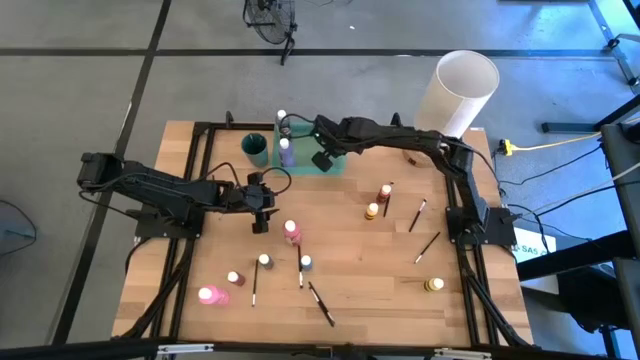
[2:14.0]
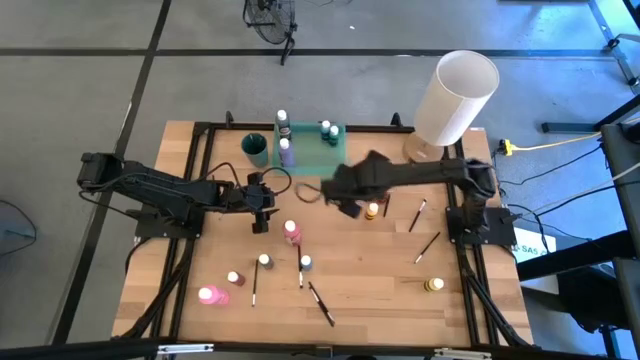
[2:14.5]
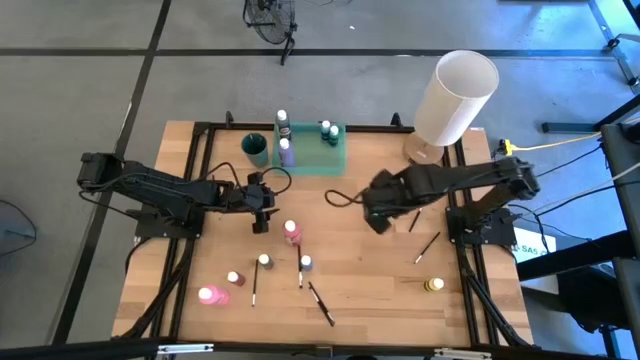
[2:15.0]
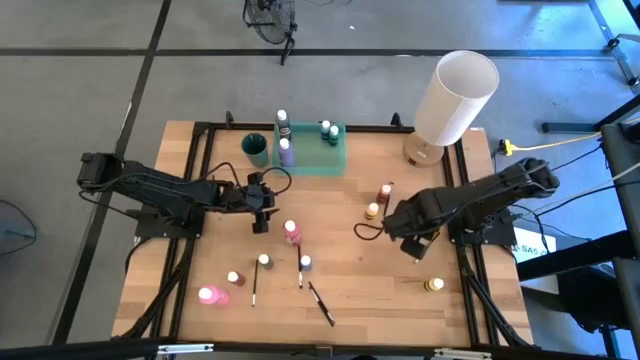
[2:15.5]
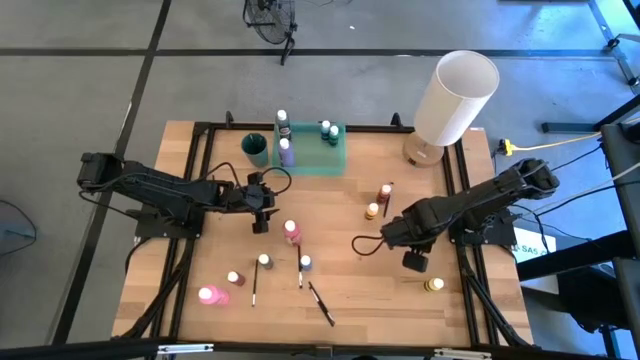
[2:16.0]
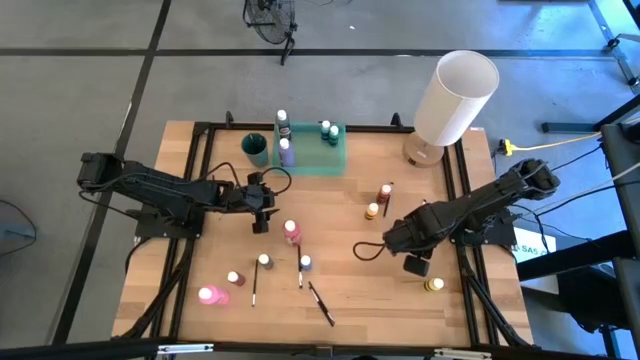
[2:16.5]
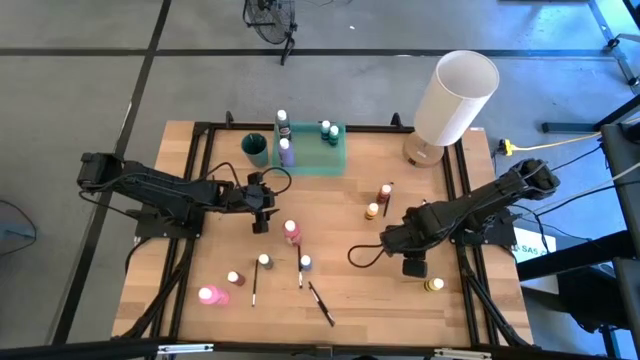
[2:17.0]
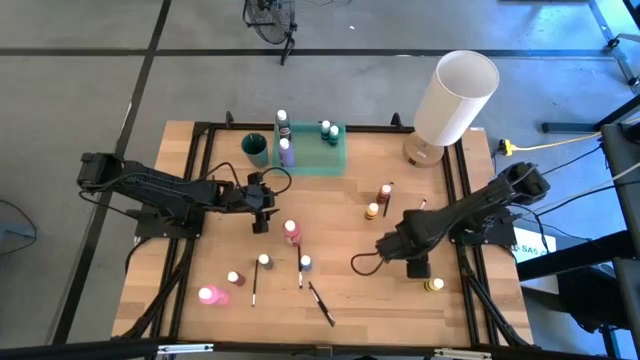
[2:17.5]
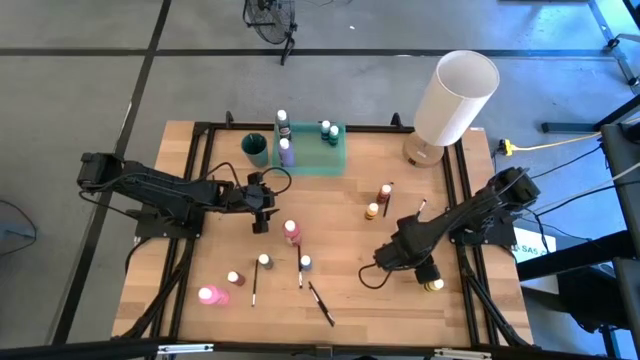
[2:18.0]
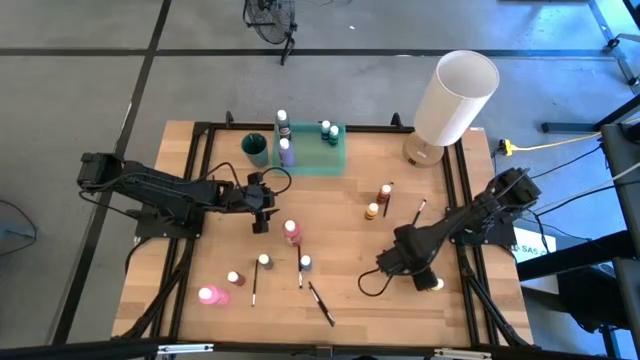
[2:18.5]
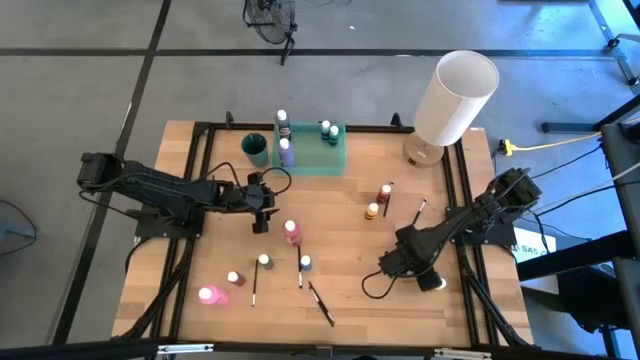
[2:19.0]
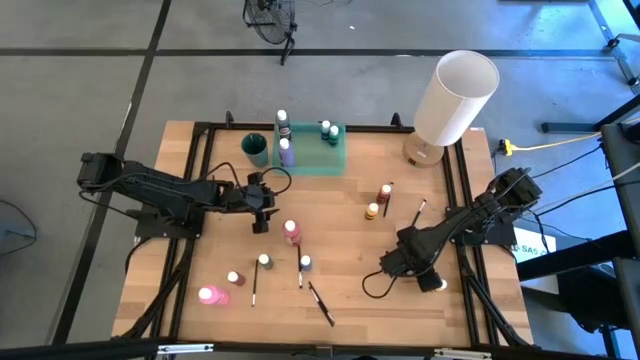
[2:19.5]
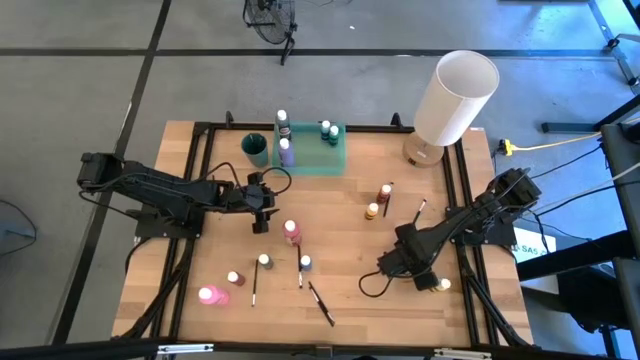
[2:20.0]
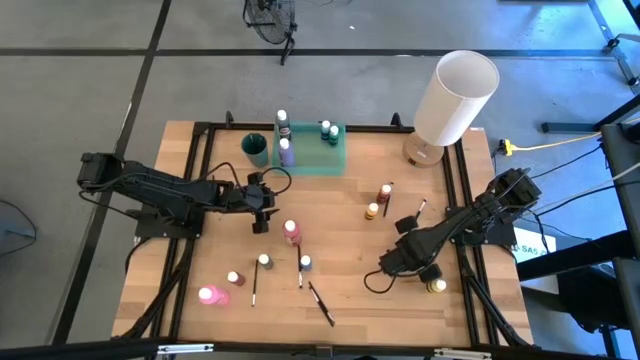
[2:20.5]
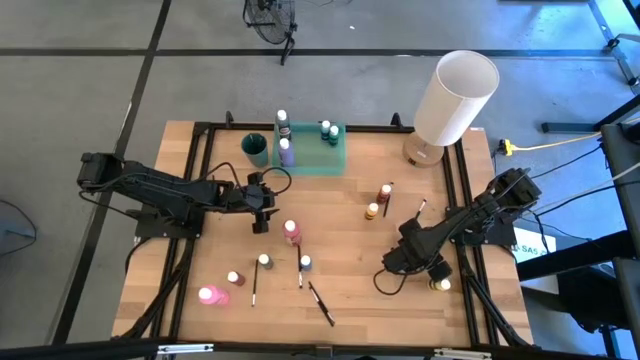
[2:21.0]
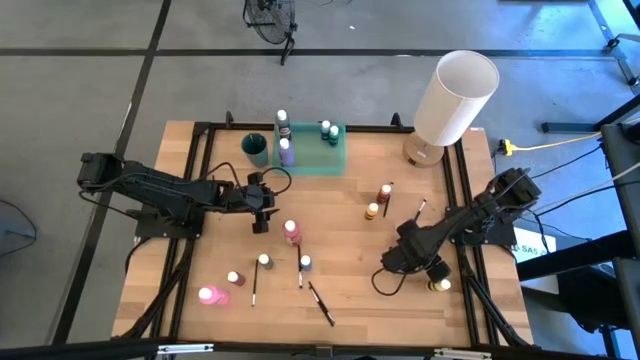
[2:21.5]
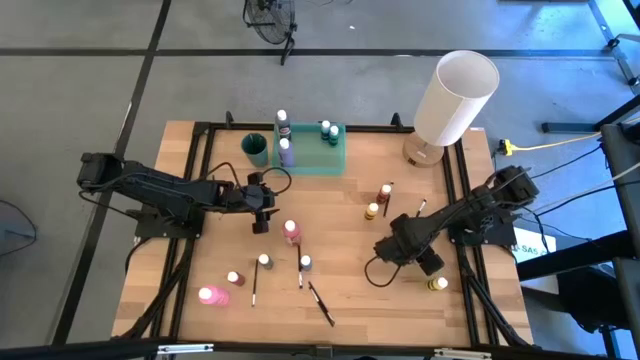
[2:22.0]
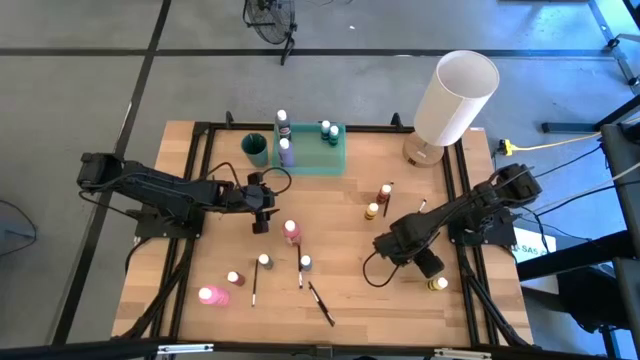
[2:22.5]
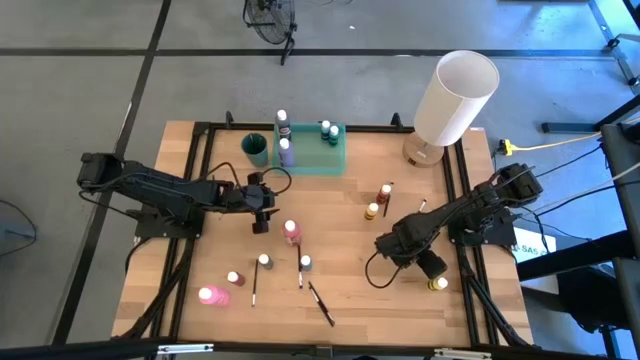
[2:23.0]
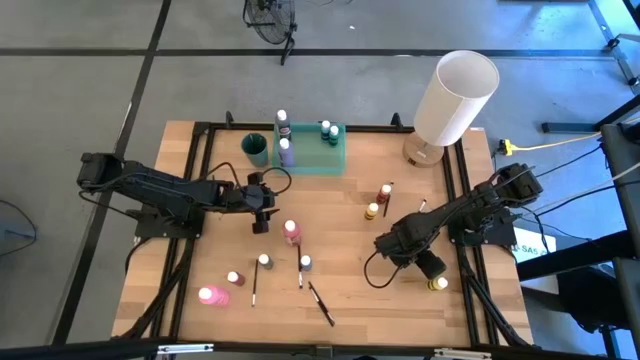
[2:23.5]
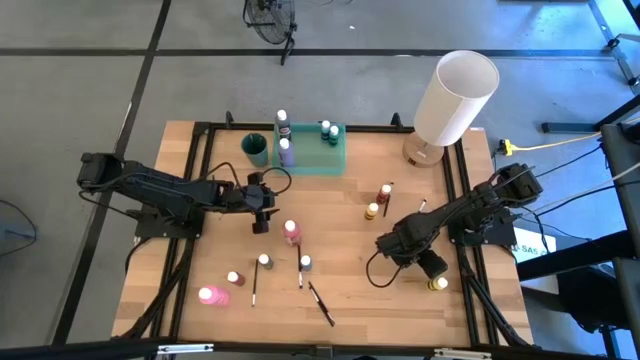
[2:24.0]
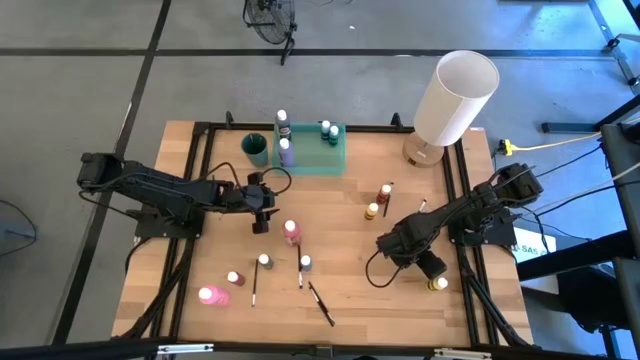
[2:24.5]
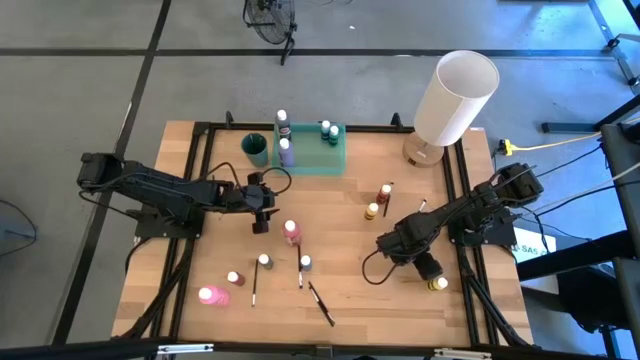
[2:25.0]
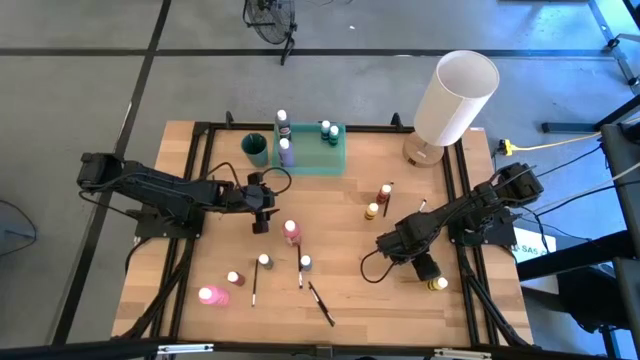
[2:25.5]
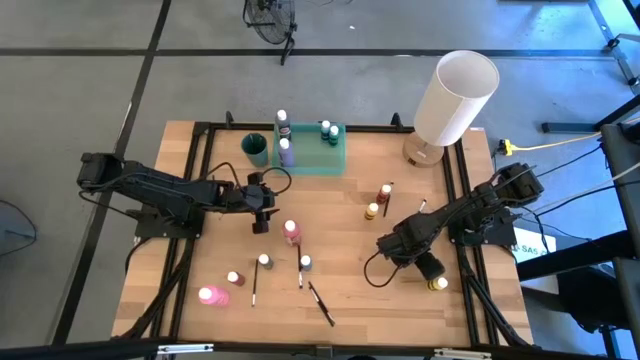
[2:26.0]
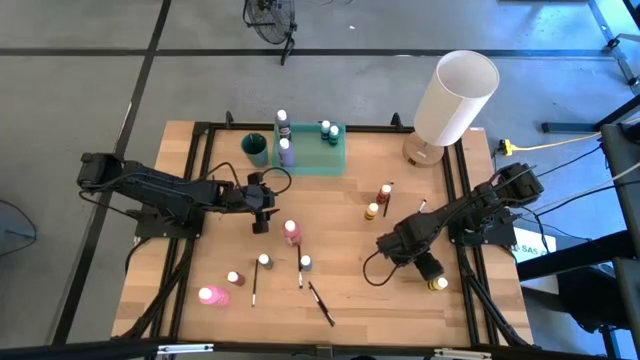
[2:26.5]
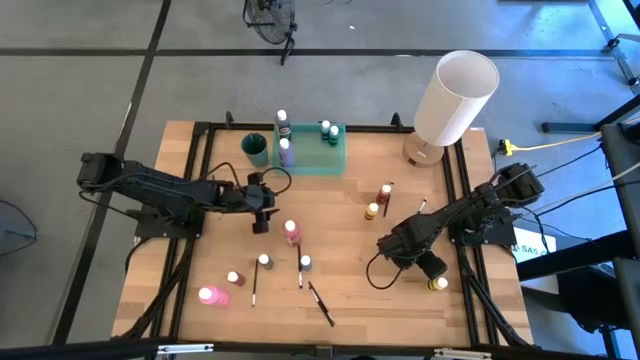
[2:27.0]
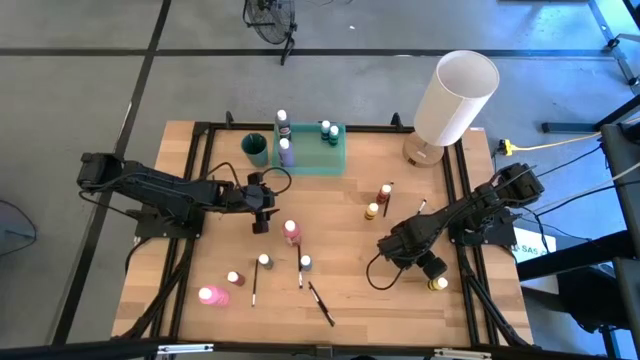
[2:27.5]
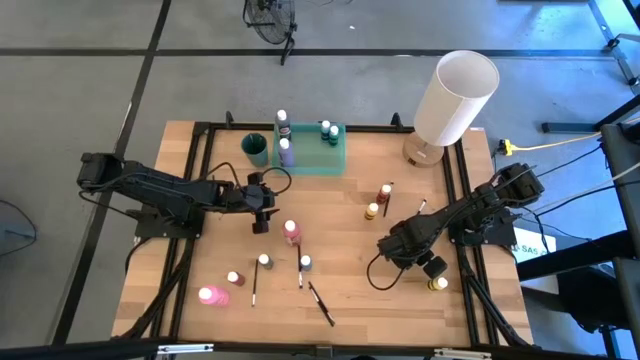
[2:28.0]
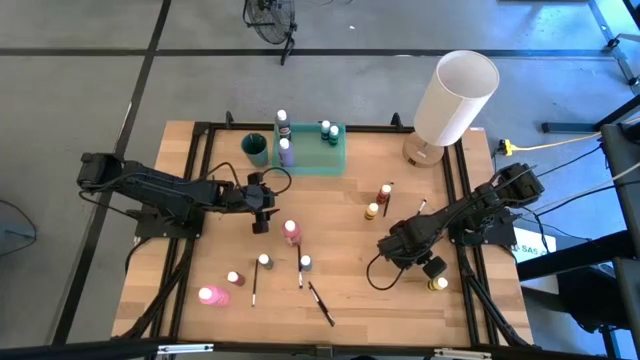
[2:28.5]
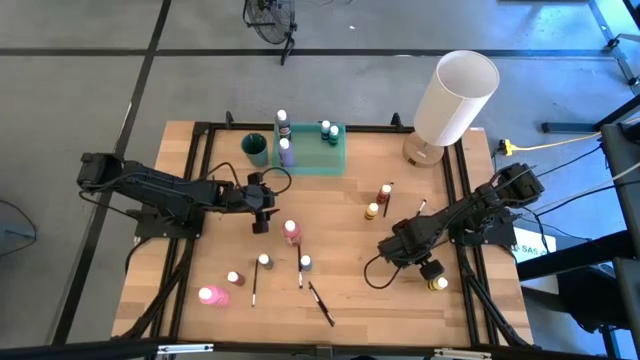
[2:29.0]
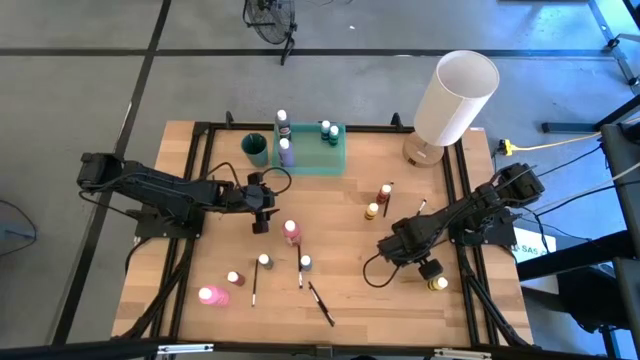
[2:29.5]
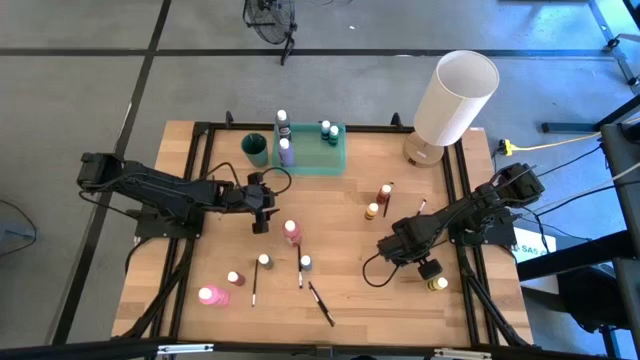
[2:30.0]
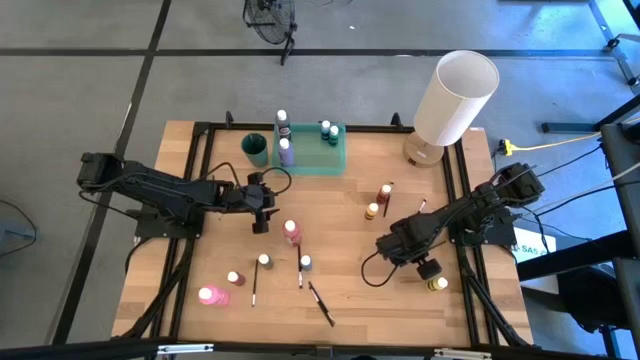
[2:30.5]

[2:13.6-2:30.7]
Task: Pick & Place Paint Supplies
Put the silver paintbrush into the green cup

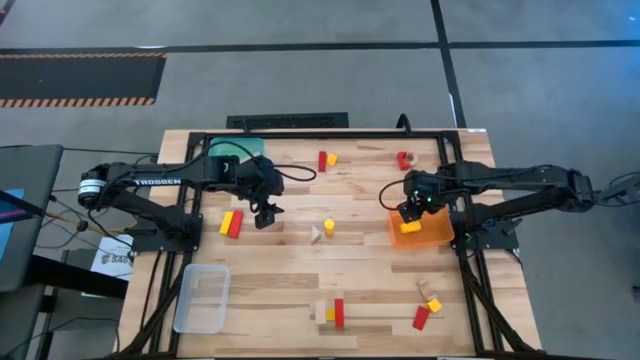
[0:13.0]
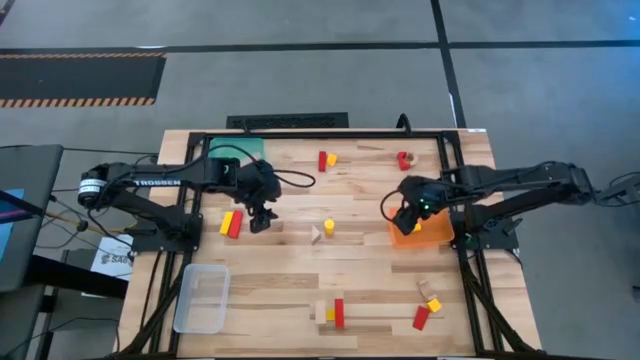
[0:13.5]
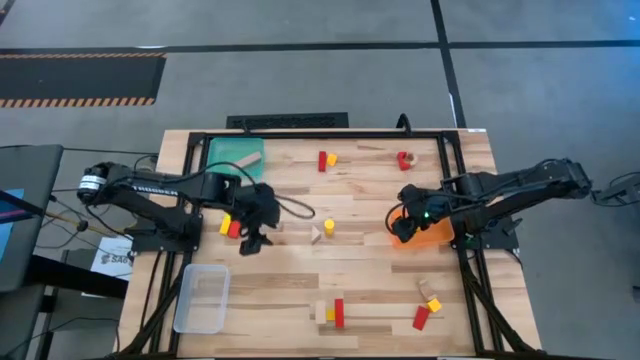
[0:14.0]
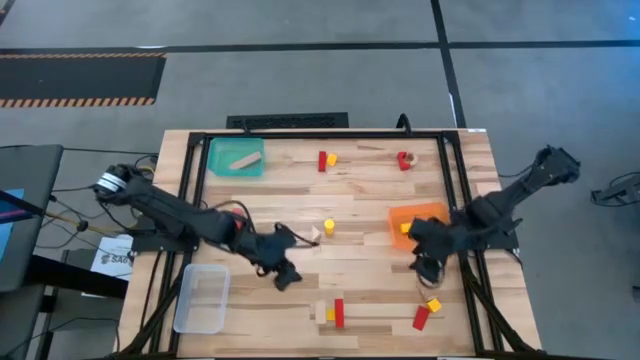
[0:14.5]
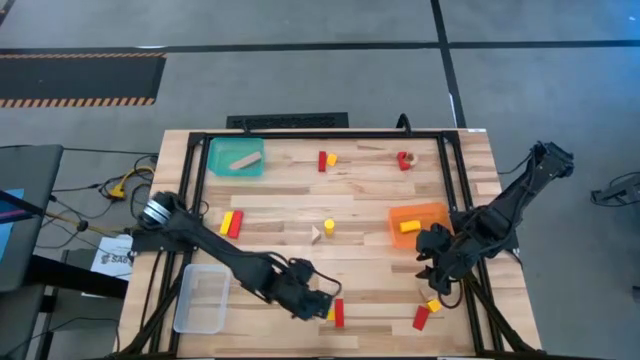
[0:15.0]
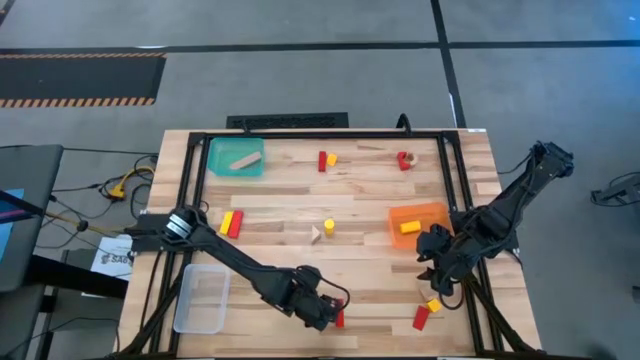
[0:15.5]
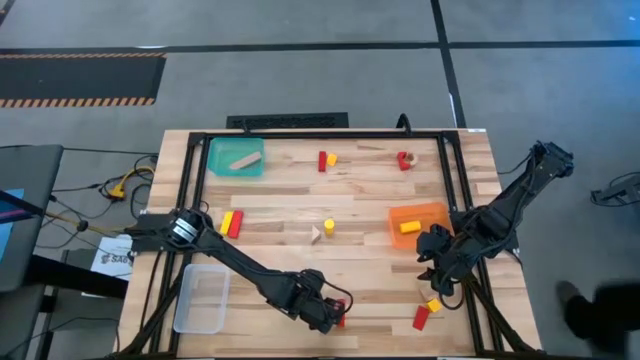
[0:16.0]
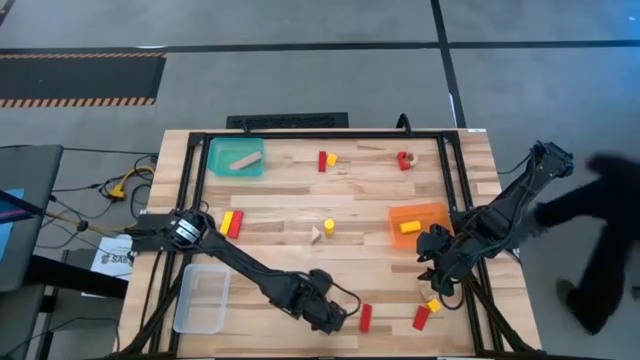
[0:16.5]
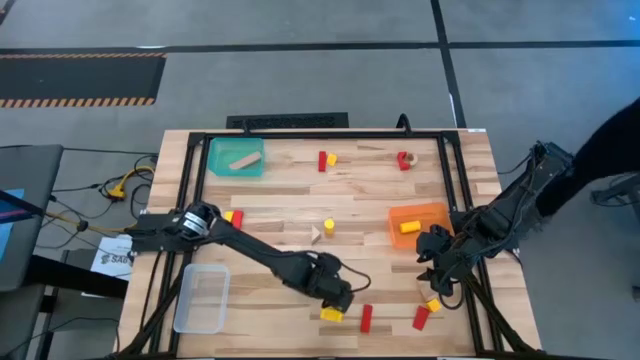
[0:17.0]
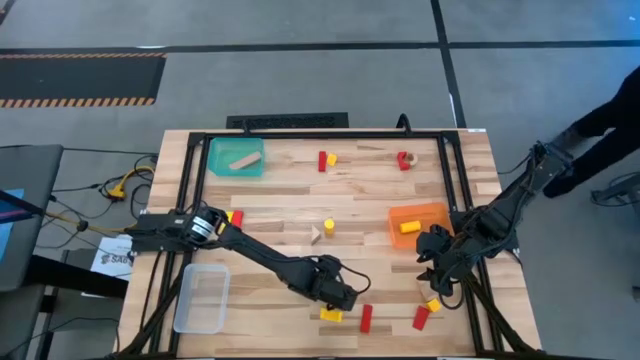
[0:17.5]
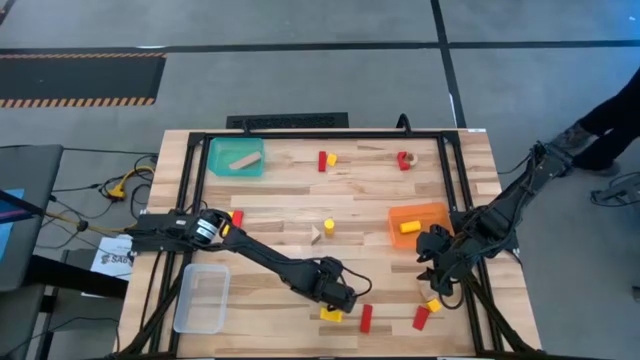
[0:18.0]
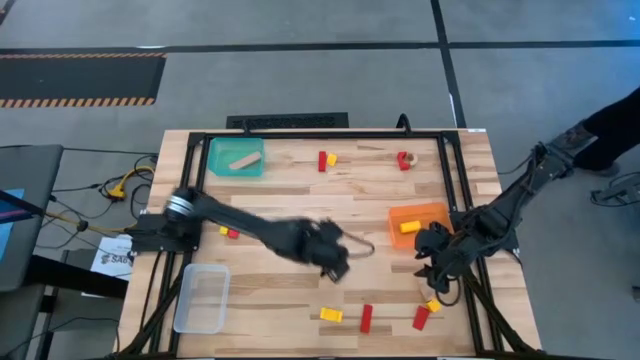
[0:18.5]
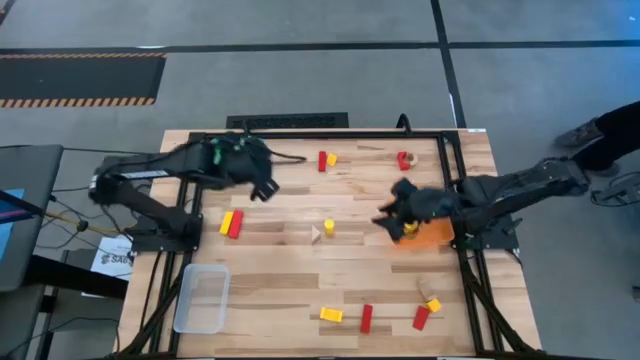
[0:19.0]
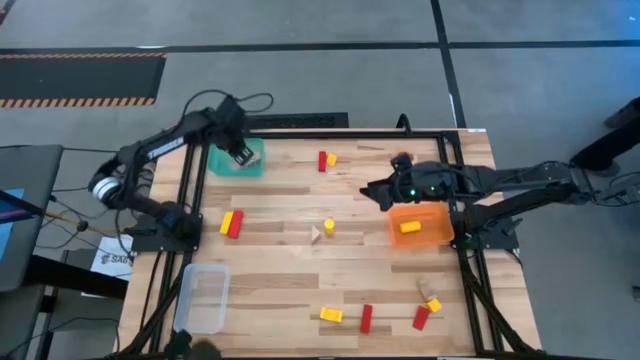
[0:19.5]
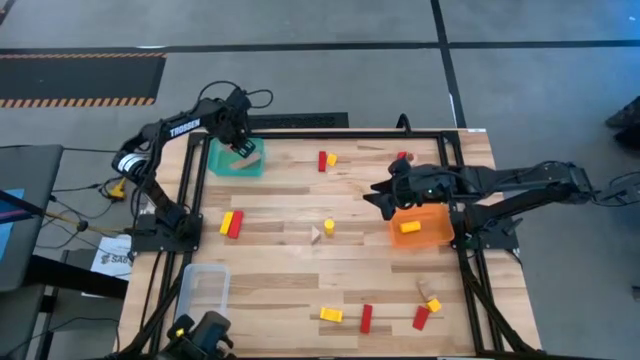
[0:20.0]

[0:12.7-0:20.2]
Task: Sort & place blocks by color
Put the light brown block into the blue bin
